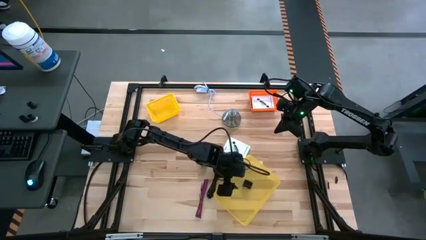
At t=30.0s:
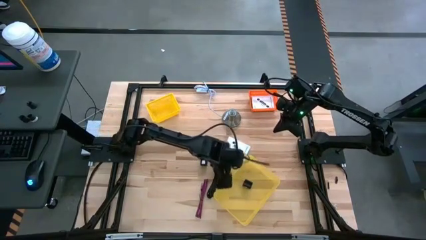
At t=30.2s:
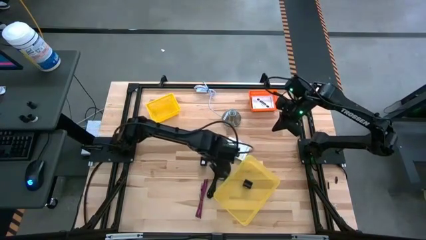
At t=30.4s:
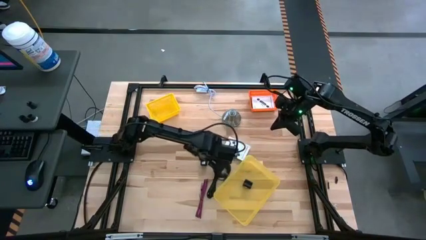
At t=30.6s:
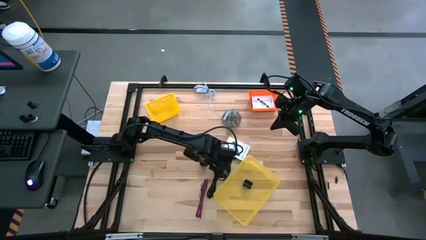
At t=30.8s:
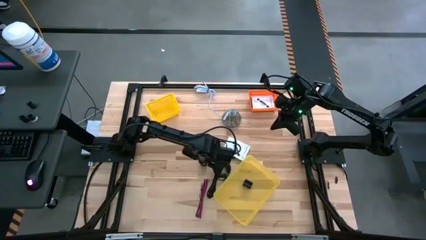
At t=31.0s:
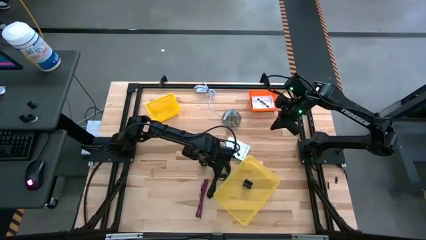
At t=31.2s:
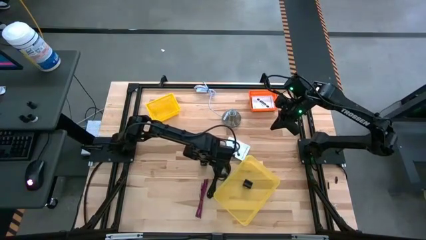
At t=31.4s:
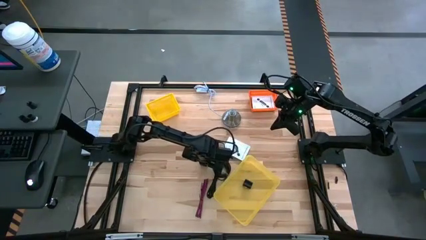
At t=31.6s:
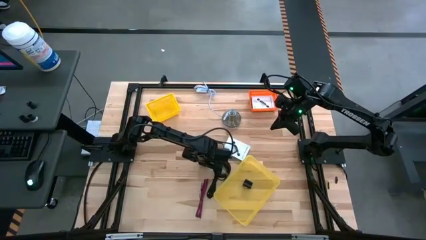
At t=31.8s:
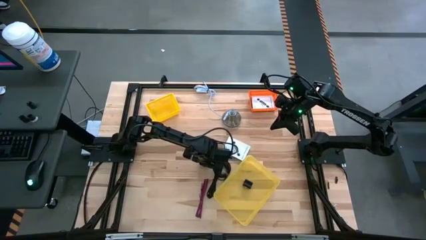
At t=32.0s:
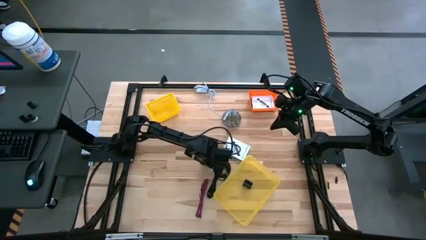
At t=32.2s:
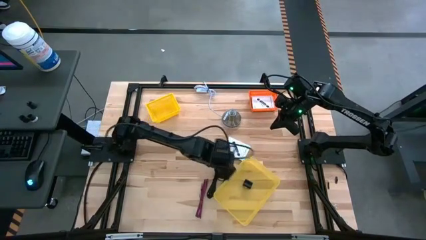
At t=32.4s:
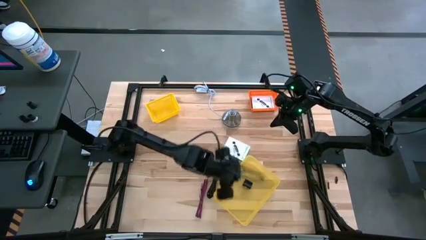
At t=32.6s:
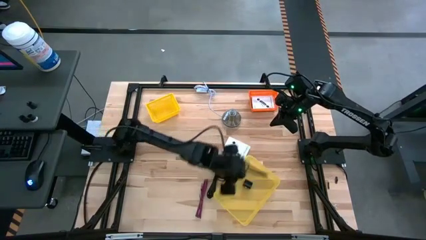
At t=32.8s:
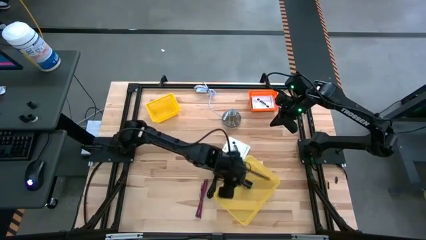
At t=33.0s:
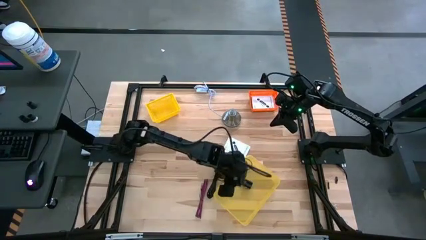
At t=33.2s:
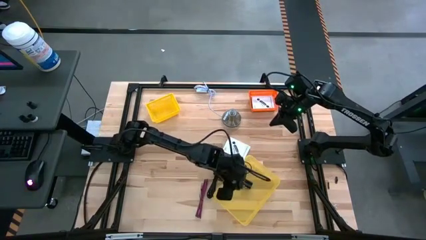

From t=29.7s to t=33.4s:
Task: Pick and place items into bin
Put the black adapter into the yellow transparent bin

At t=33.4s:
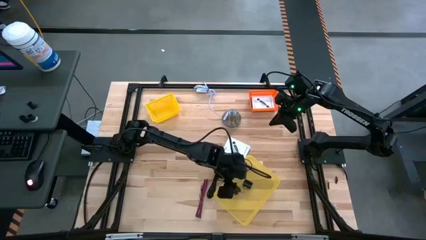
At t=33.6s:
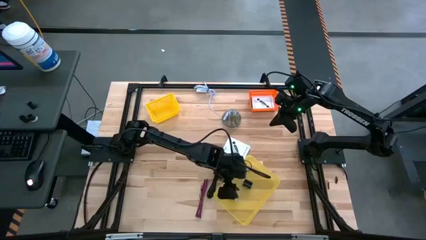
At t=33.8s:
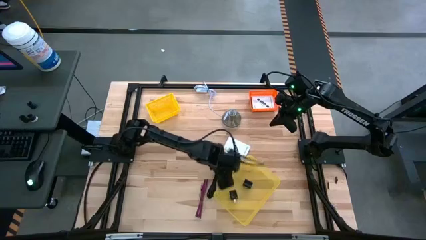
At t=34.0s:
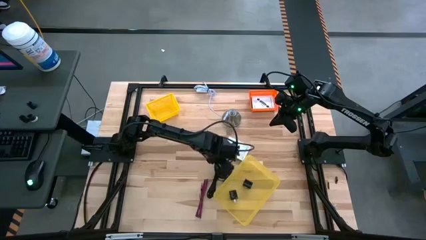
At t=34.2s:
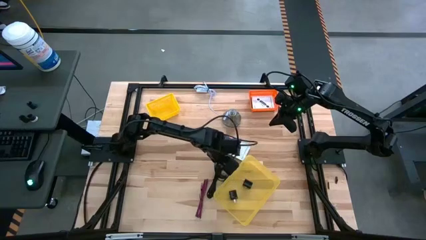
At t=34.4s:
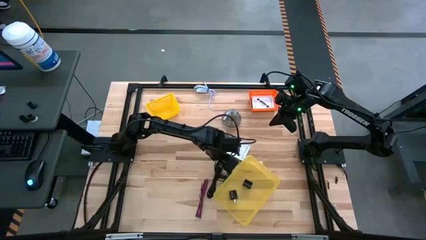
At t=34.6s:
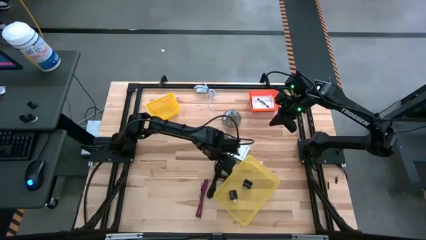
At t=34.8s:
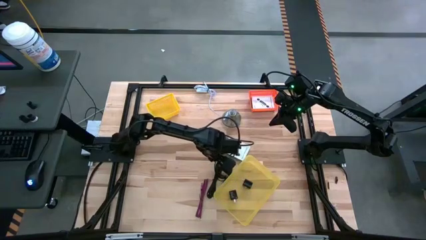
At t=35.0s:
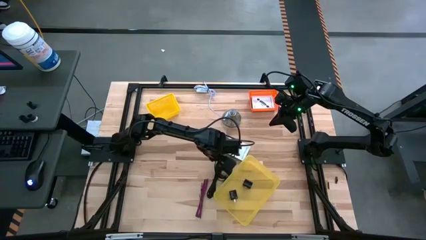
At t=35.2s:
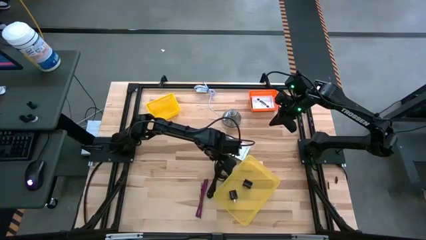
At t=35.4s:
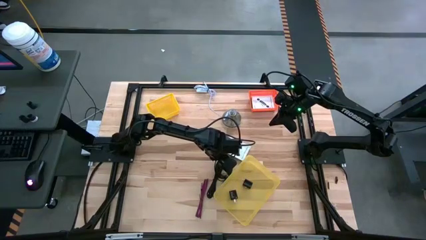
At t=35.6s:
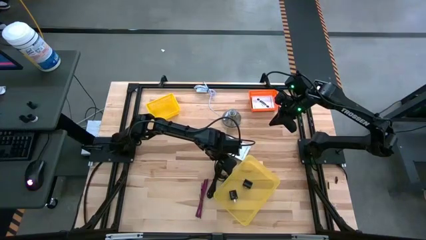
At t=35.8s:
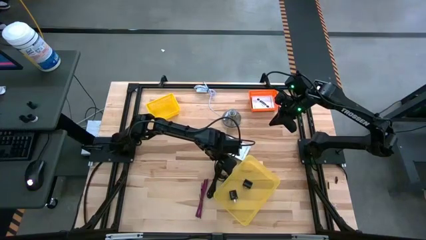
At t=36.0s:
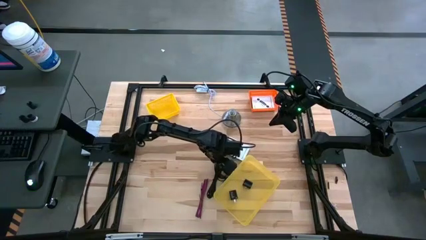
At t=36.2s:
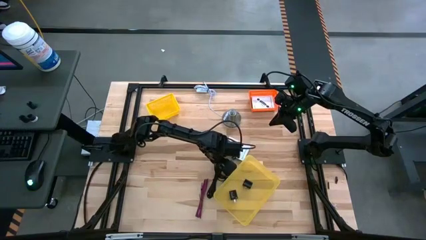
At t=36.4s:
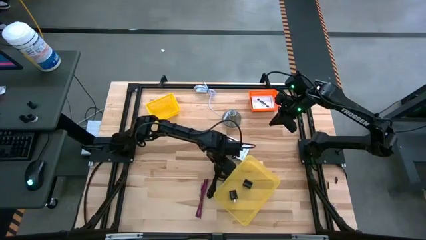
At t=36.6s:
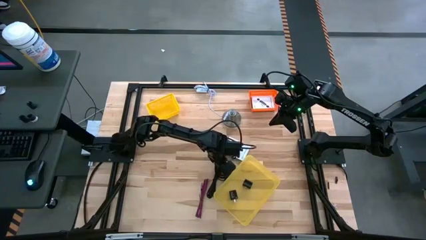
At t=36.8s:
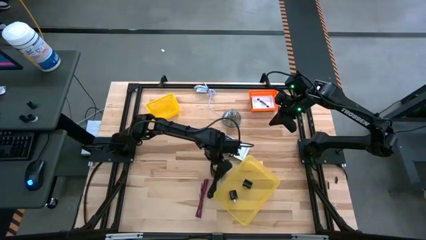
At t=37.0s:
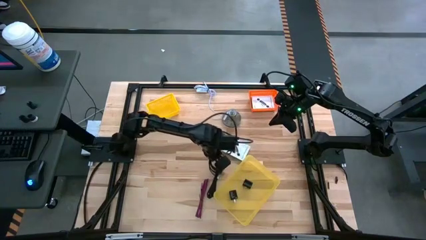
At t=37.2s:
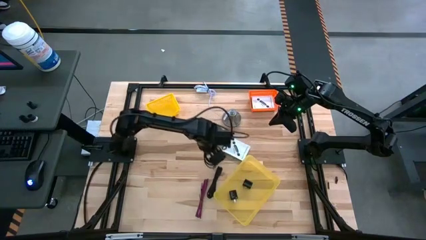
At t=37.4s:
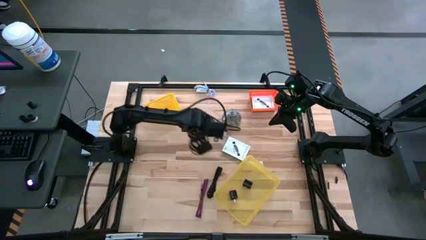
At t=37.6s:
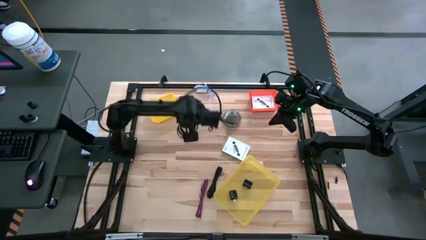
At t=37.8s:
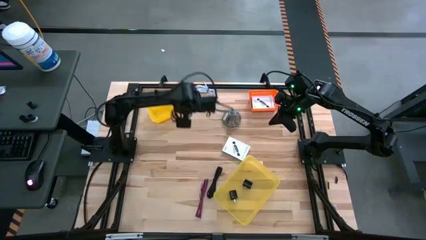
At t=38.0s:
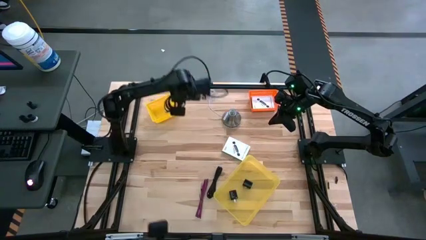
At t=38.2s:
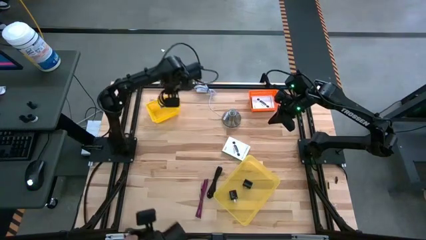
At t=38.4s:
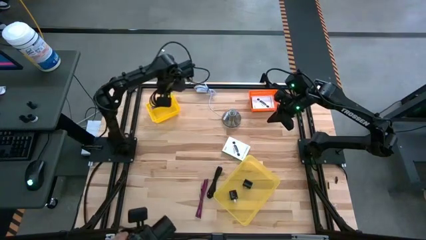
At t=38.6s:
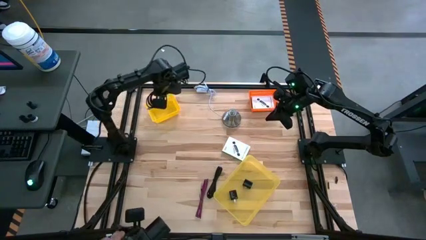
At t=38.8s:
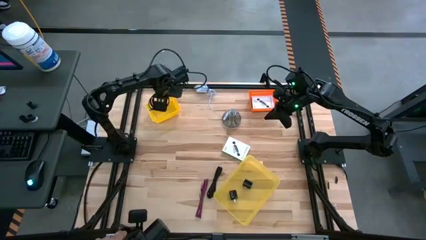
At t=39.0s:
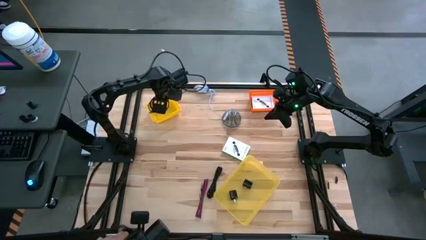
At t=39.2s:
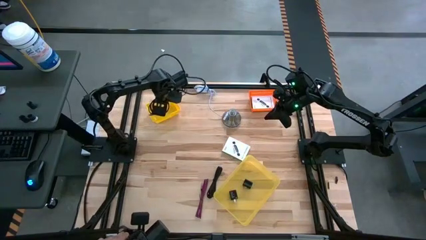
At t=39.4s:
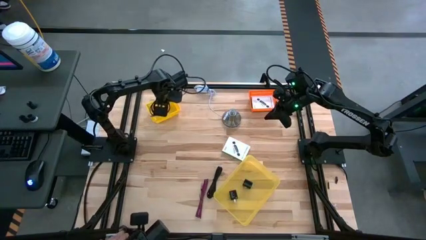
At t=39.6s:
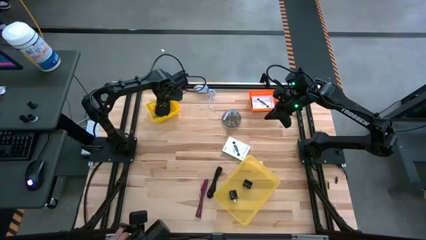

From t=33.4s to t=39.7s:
Put the top black USB cable into the yellow bin

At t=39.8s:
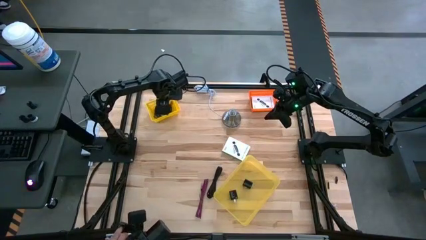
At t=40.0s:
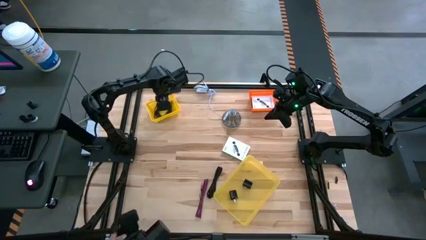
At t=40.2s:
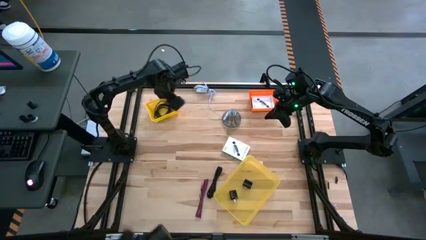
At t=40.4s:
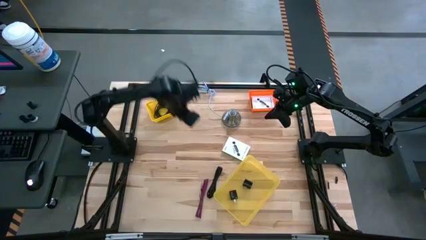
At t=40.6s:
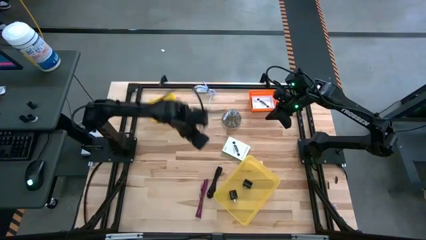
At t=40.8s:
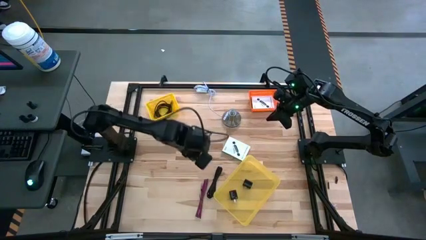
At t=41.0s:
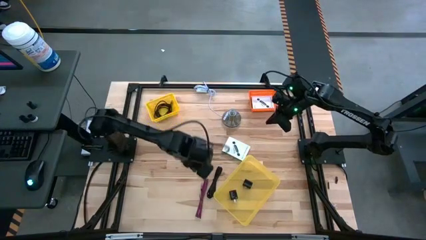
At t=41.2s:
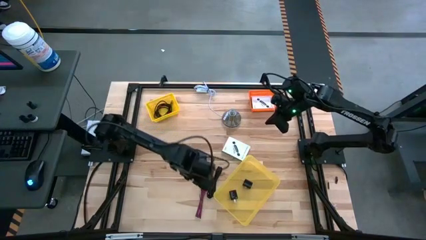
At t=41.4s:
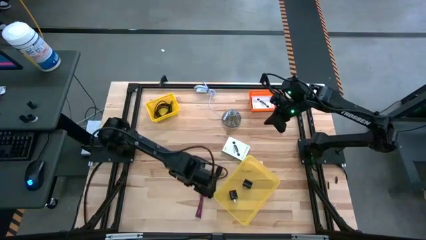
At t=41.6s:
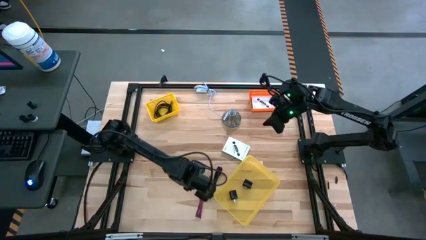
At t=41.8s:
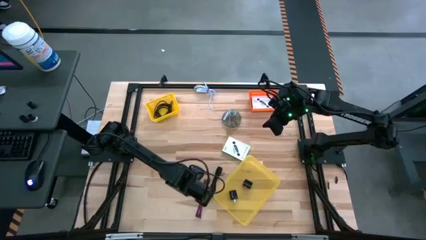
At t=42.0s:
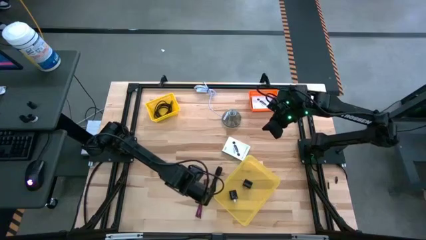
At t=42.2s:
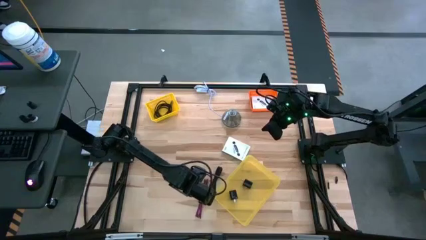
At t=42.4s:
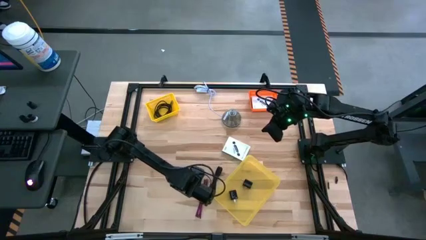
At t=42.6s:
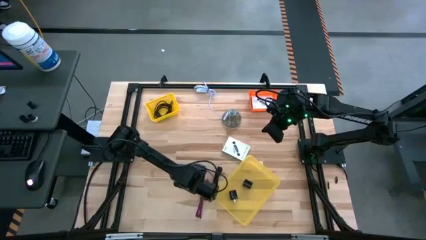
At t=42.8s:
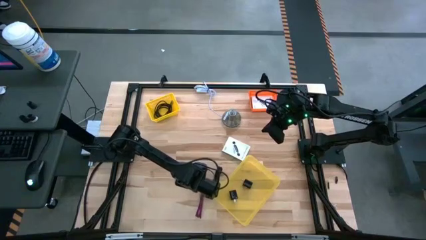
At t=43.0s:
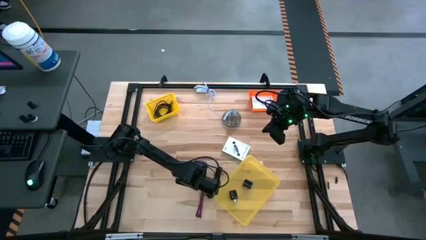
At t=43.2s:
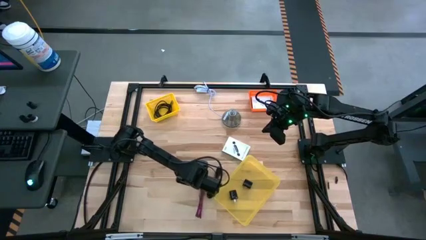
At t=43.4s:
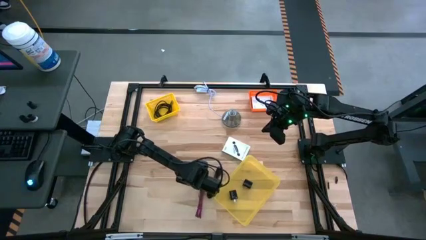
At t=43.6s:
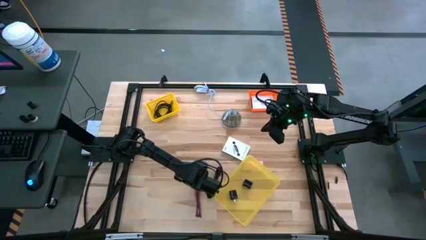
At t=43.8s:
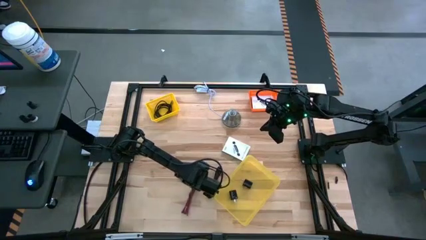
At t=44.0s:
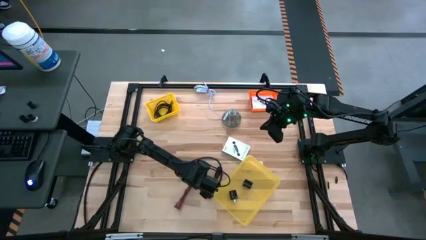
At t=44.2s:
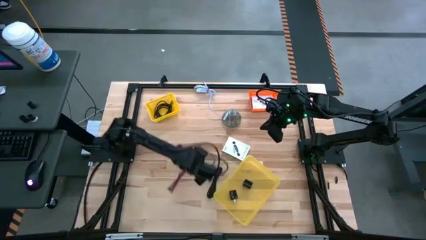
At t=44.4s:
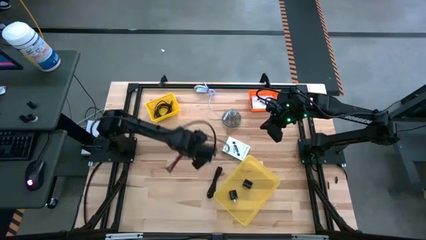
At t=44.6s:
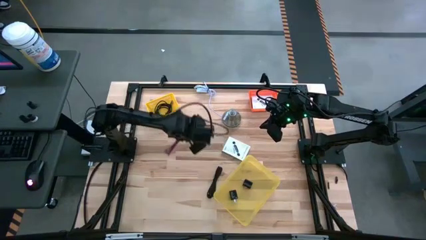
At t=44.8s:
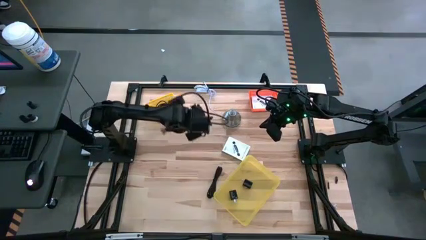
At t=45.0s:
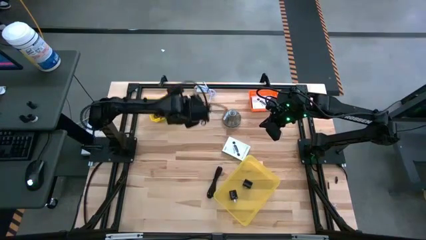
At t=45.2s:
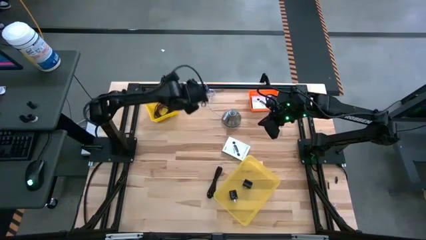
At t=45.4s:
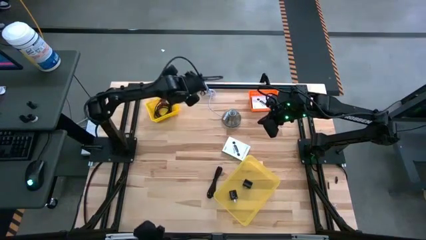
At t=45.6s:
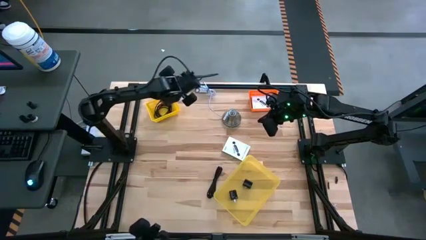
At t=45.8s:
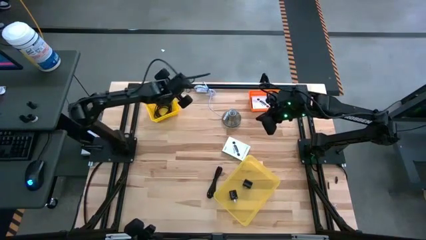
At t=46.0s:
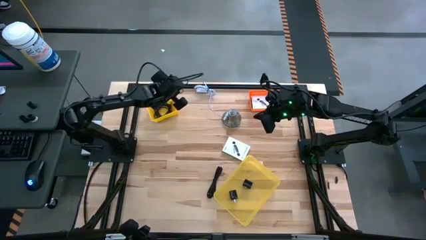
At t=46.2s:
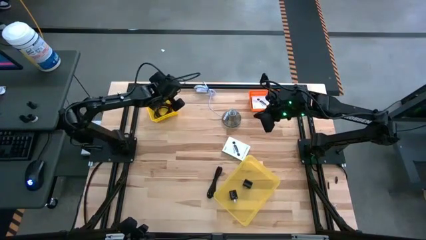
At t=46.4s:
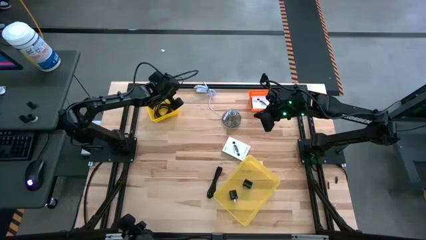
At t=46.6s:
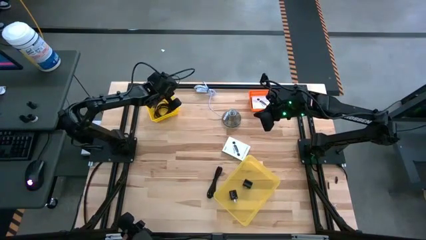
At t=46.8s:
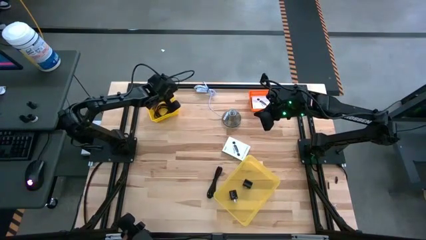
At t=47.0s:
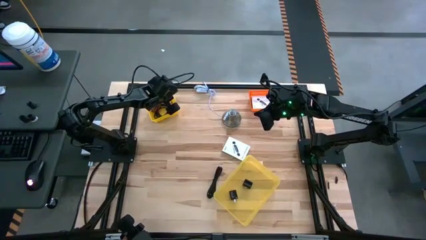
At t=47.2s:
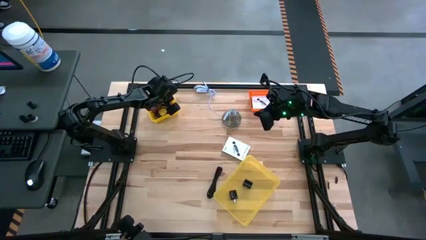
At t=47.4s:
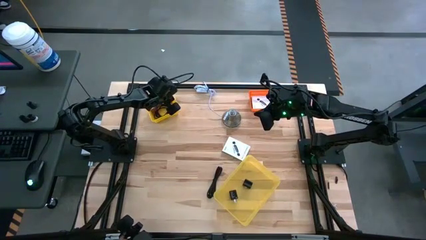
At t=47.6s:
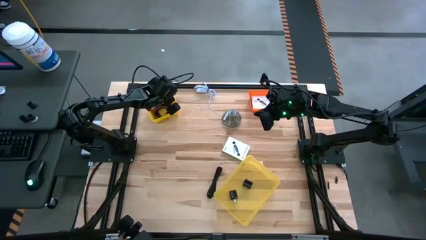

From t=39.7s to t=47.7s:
Put the pink USB cable into the yellow bin
